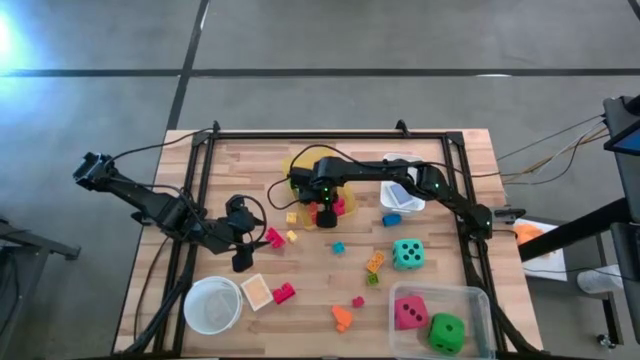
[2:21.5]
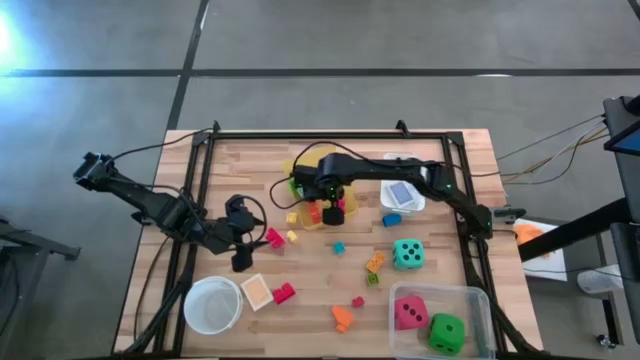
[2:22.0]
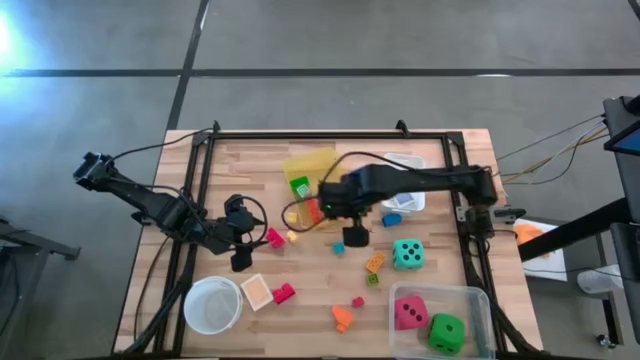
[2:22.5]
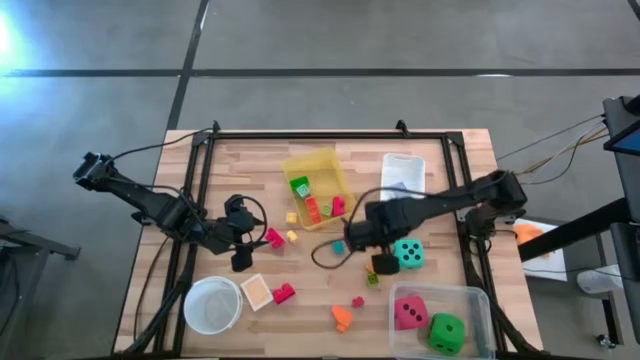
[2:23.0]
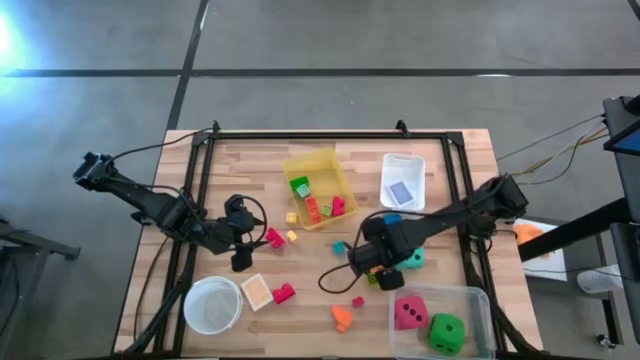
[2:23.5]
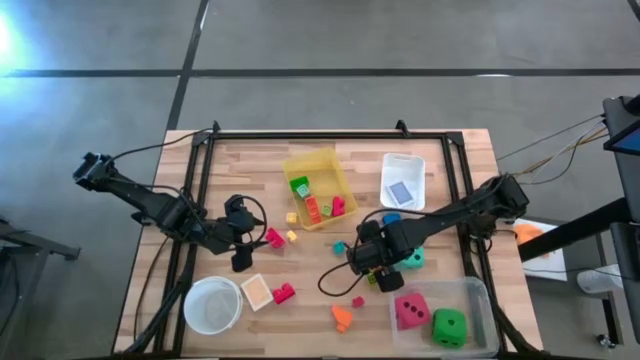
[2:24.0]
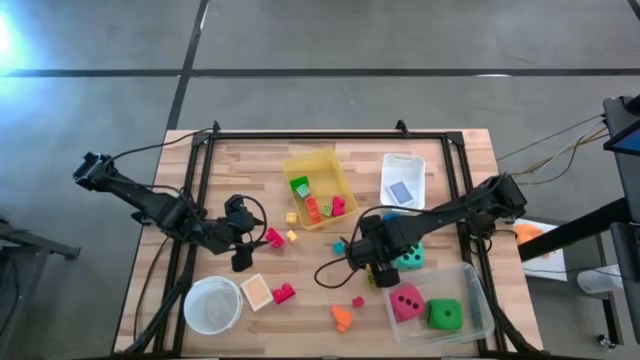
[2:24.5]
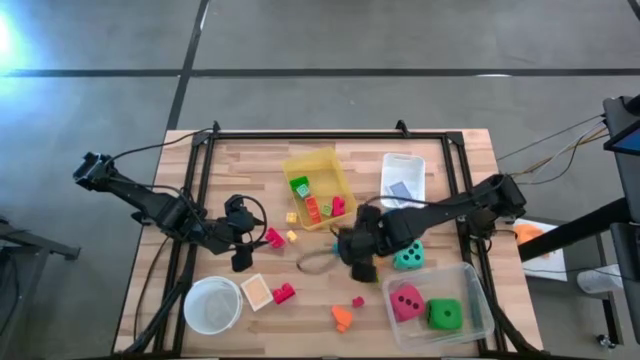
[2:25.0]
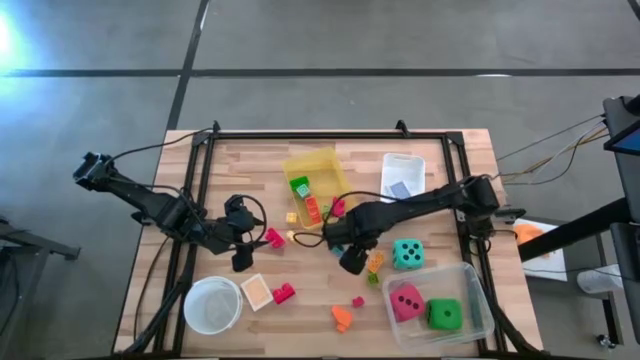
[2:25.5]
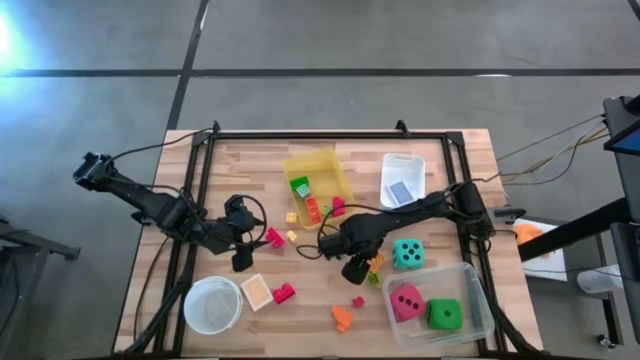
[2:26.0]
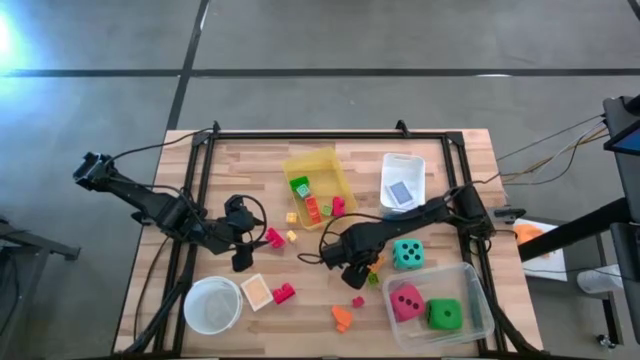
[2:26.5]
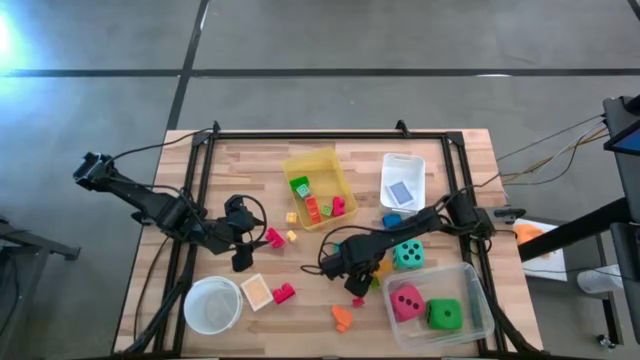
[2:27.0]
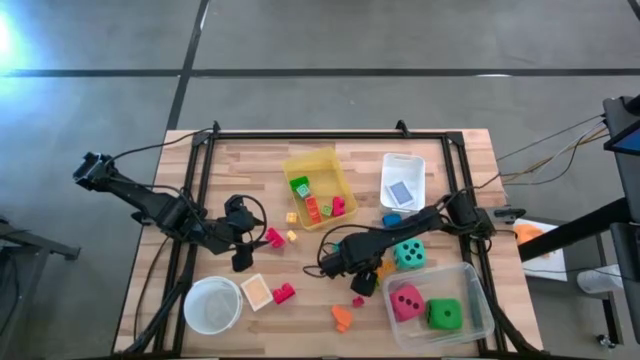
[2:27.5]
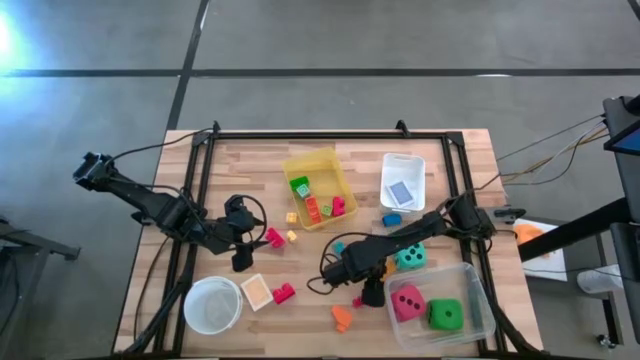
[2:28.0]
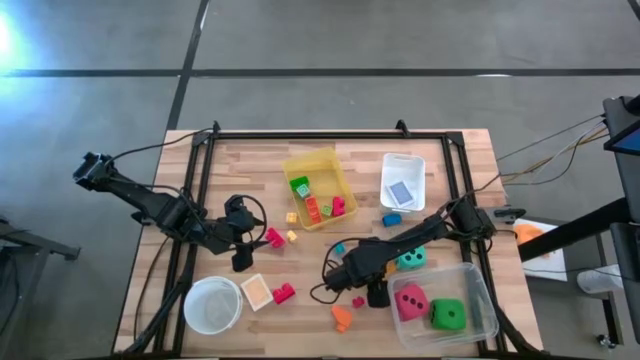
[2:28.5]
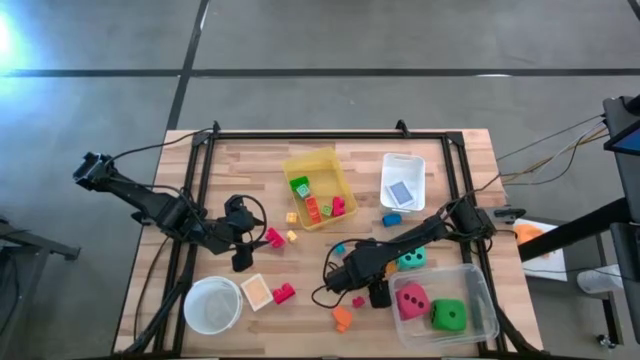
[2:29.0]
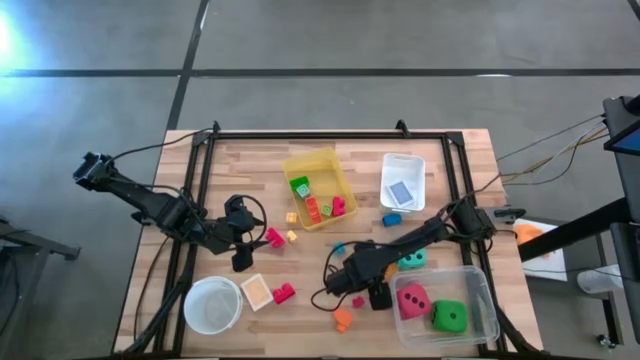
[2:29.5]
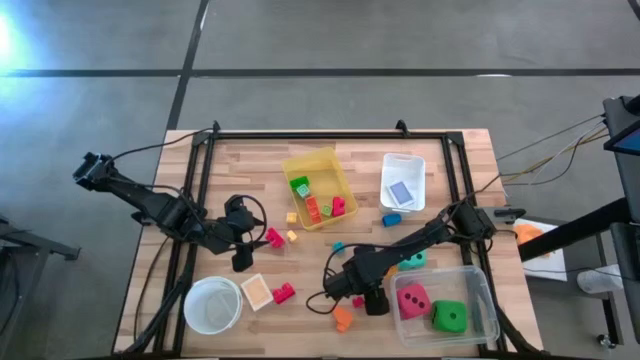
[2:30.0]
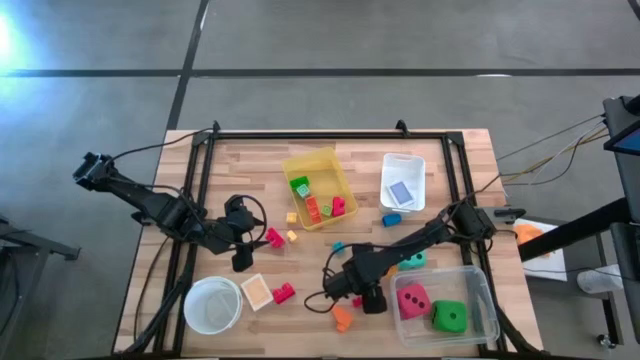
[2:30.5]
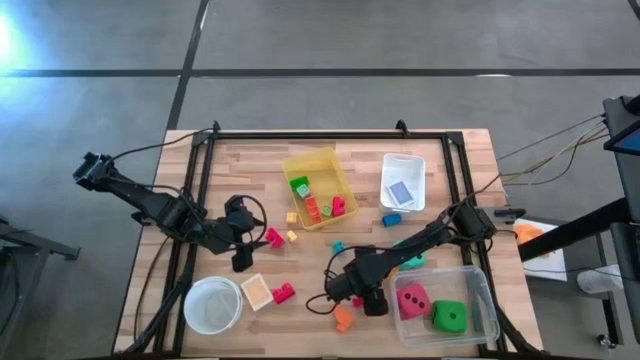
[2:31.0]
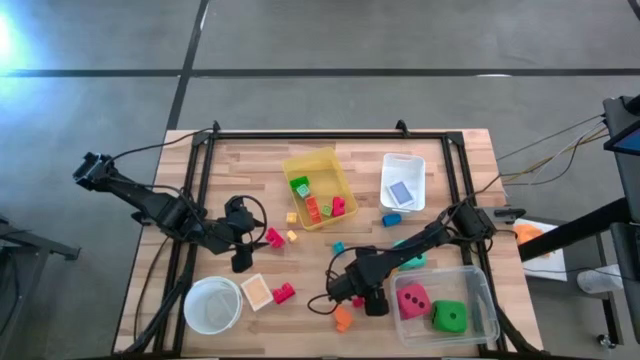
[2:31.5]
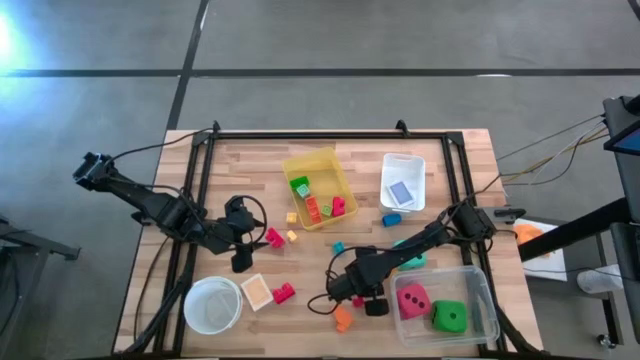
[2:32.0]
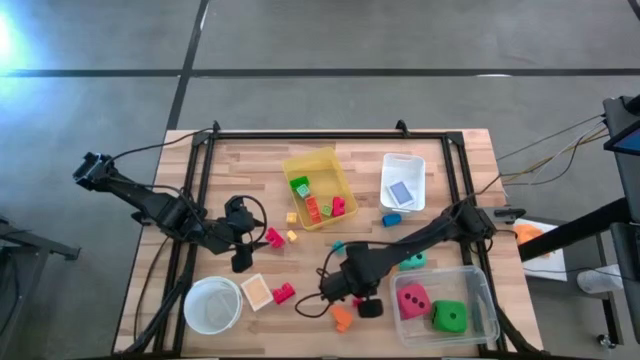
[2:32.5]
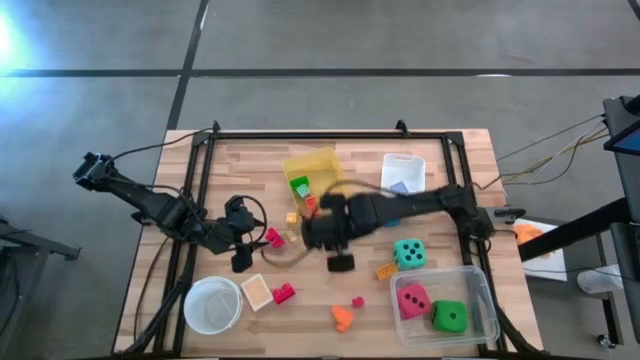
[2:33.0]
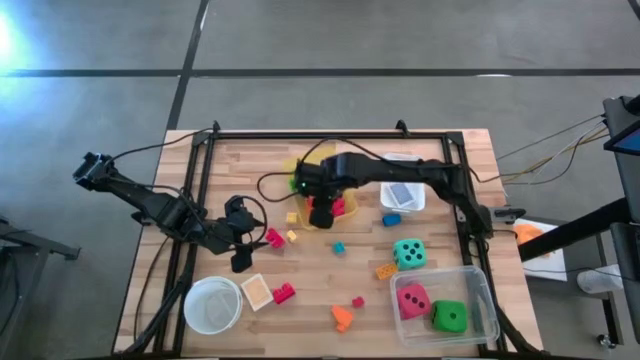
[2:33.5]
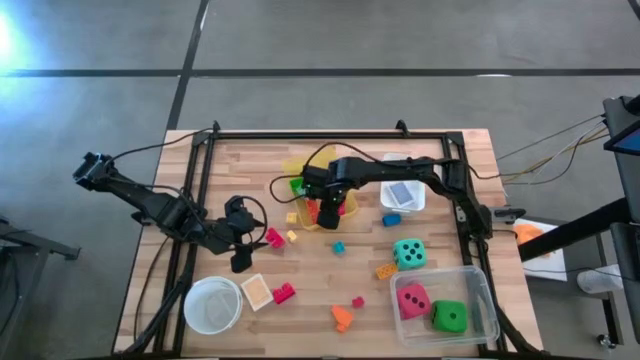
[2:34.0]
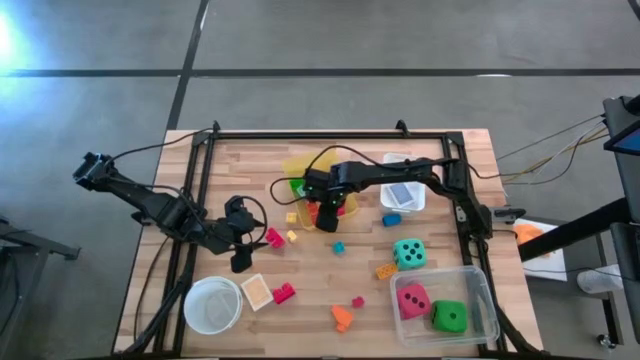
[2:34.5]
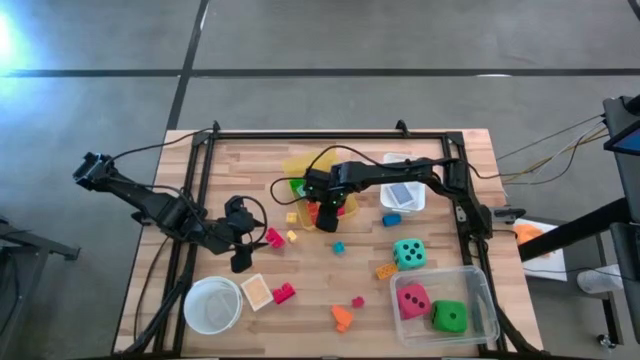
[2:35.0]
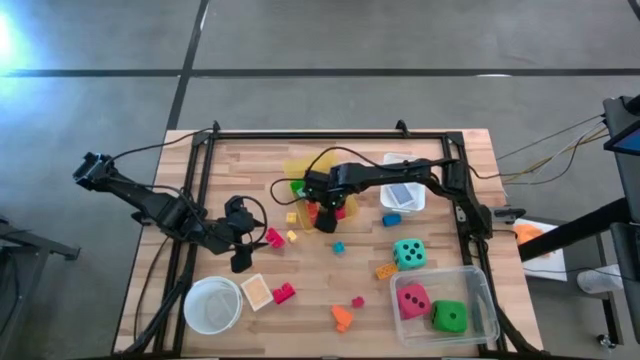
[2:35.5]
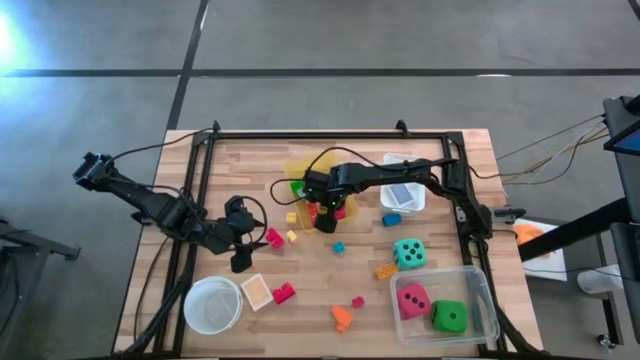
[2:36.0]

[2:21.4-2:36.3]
Task: Pick & Place Toys
Put the light green game piece into the yellow bin

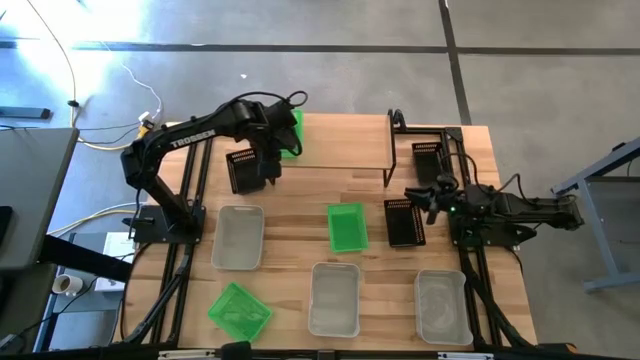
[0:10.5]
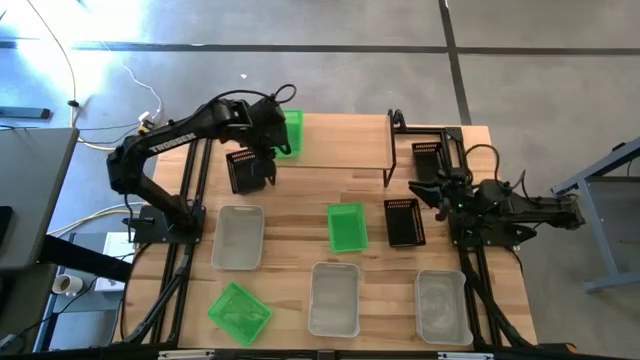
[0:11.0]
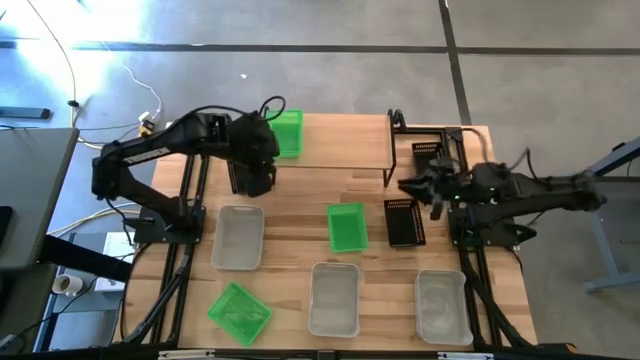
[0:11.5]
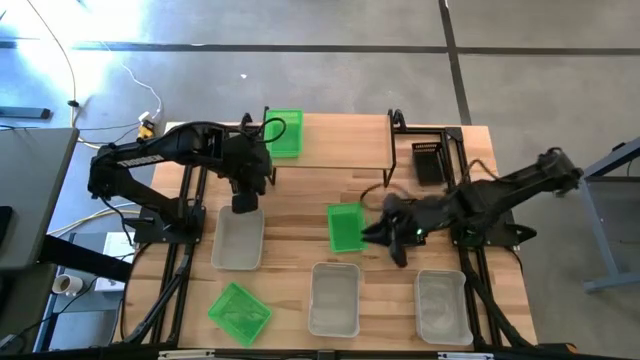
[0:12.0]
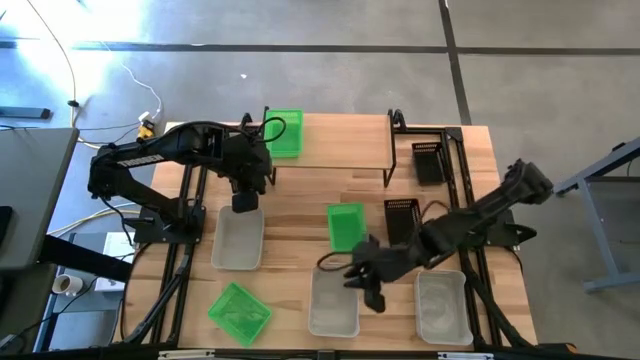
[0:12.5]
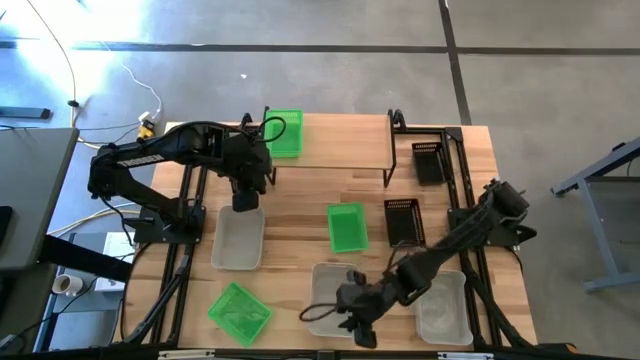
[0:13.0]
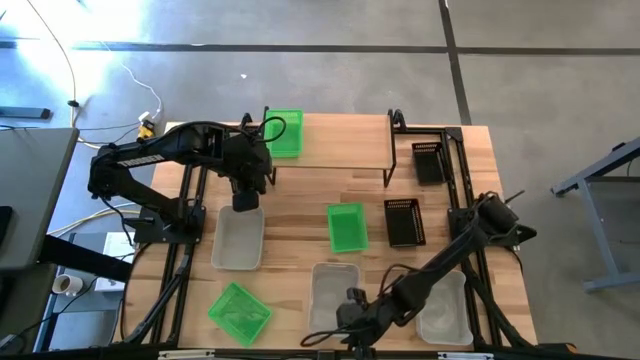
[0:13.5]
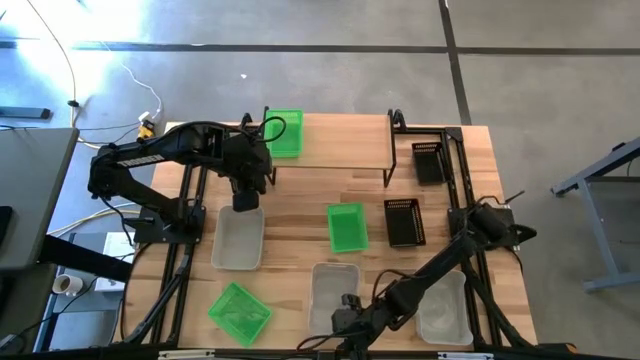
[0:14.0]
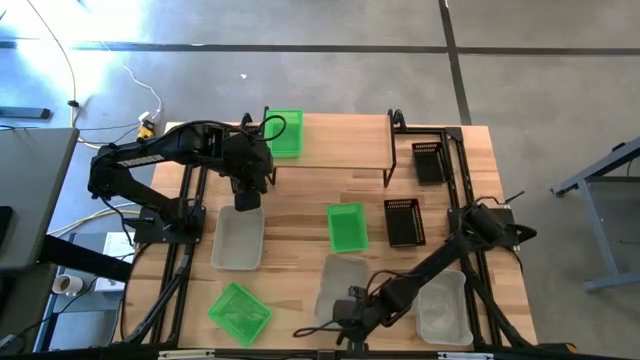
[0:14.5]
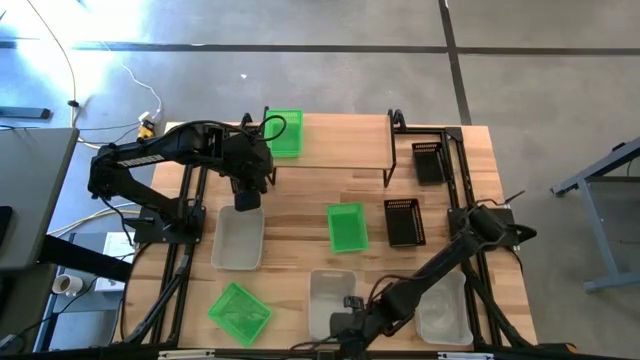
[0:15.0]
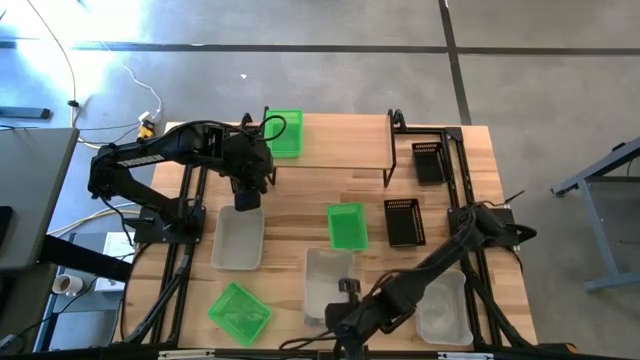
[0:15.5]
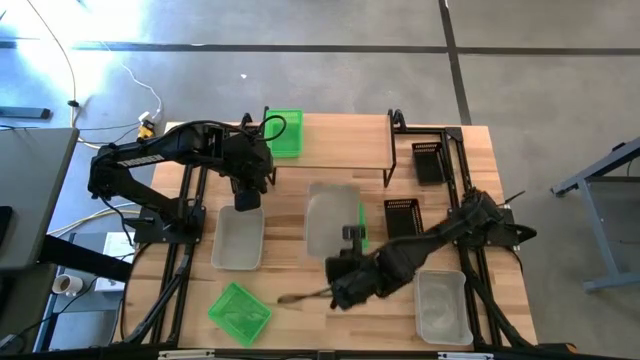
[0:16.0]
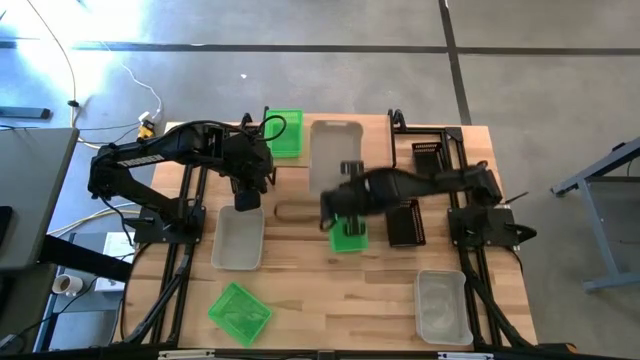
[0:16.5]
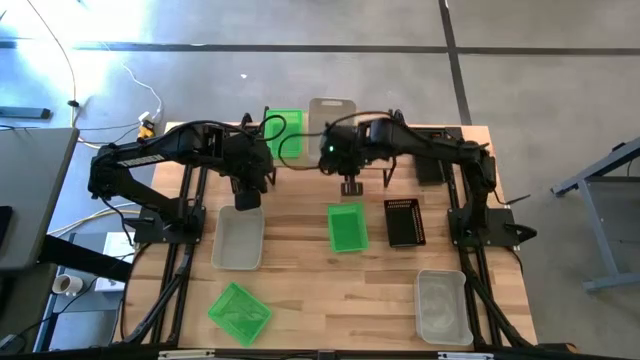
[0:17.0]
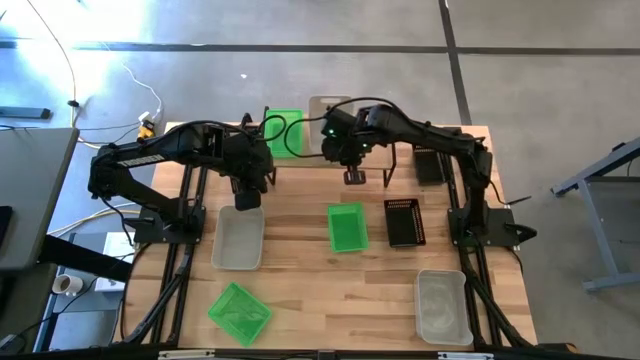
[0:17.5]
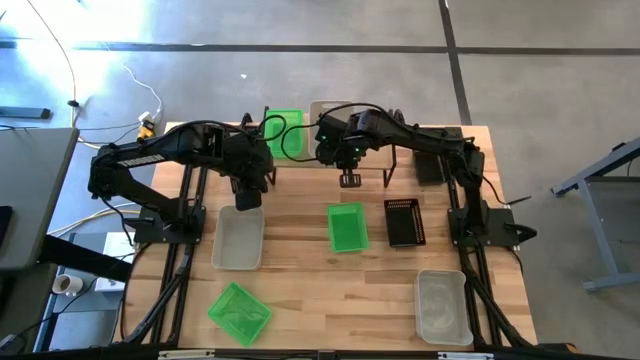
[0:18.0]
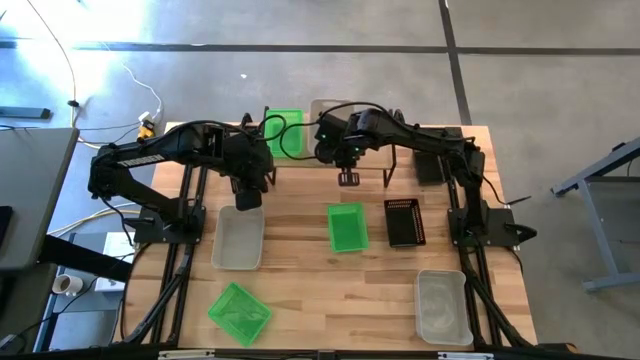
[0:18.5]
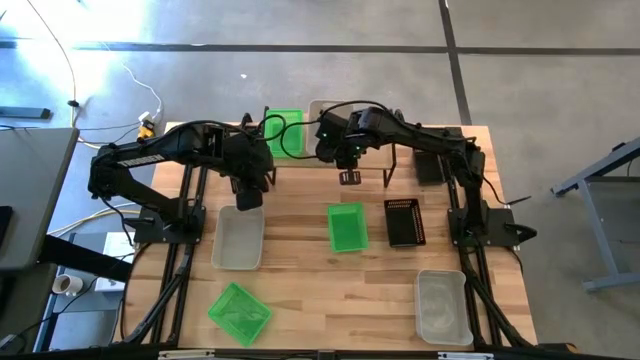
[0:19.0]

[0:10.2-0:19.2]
Task: Stack baskets on shelf by color
Put the middle gray bin on the shelf
